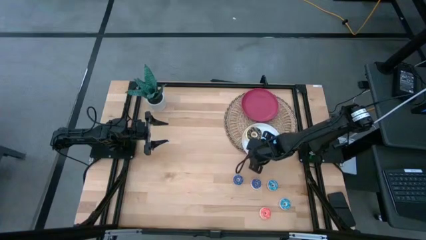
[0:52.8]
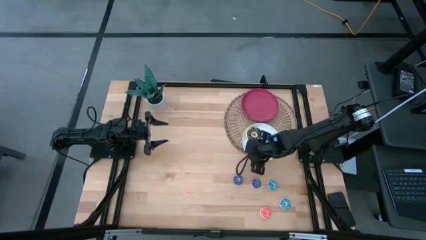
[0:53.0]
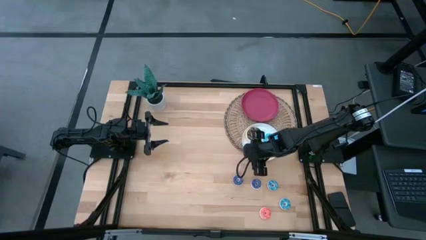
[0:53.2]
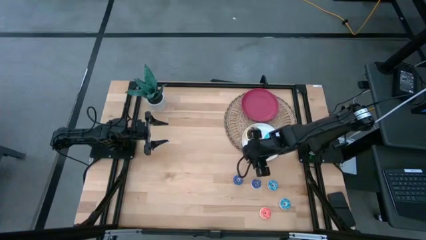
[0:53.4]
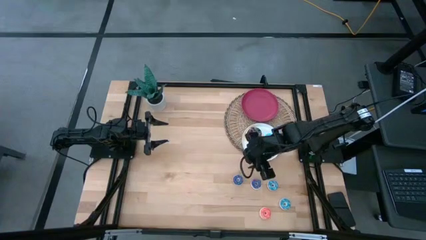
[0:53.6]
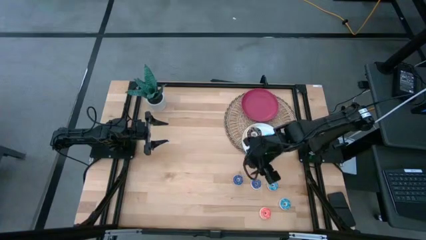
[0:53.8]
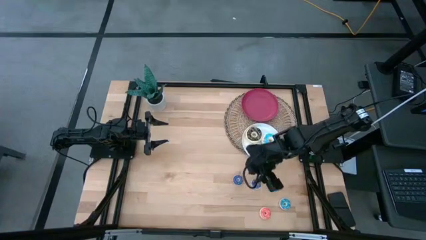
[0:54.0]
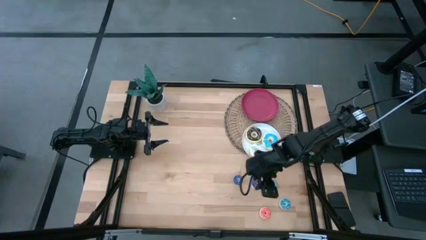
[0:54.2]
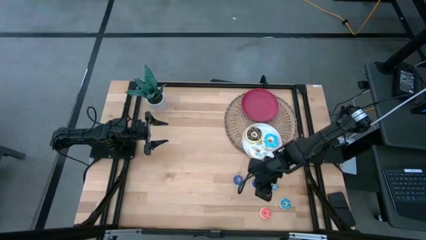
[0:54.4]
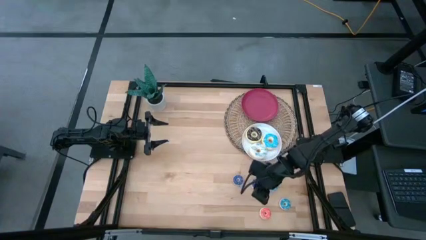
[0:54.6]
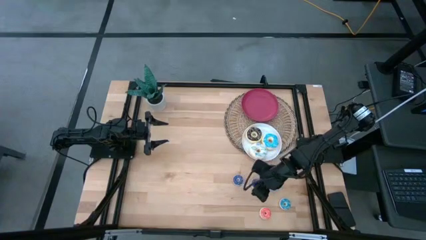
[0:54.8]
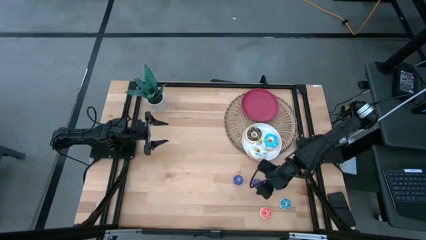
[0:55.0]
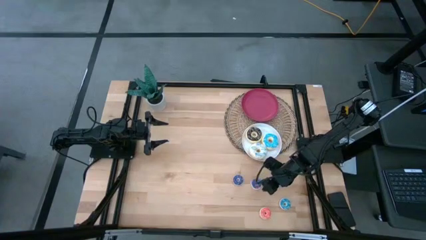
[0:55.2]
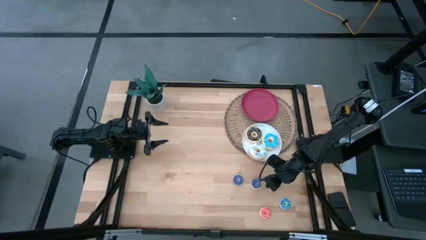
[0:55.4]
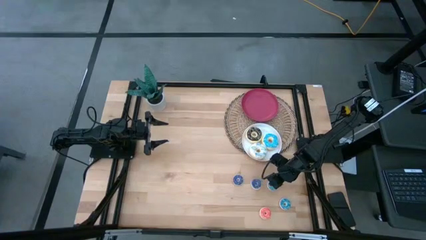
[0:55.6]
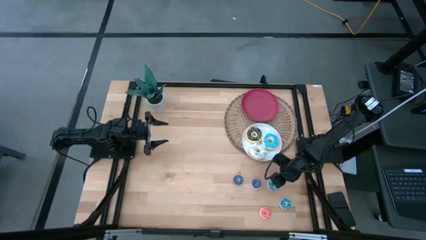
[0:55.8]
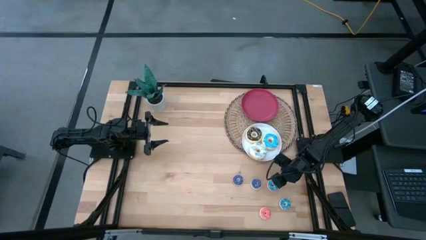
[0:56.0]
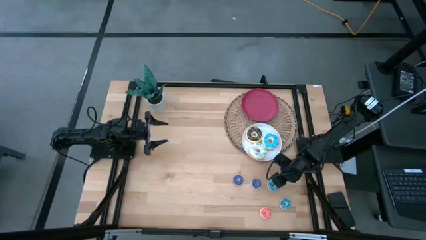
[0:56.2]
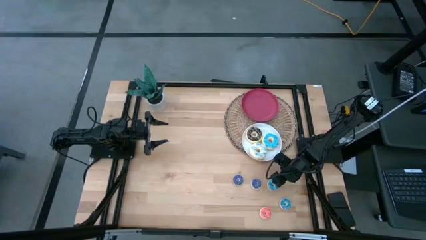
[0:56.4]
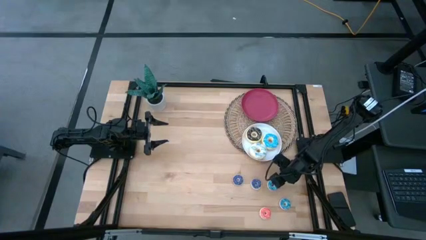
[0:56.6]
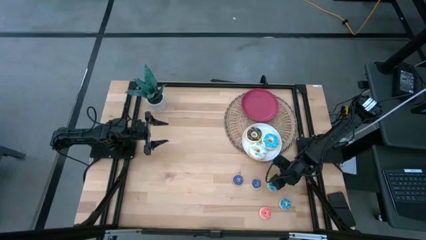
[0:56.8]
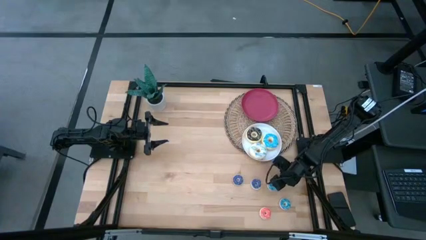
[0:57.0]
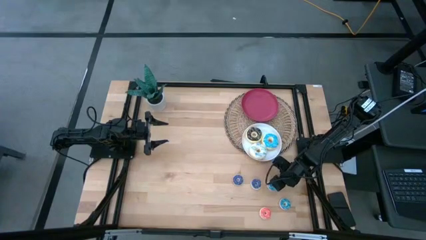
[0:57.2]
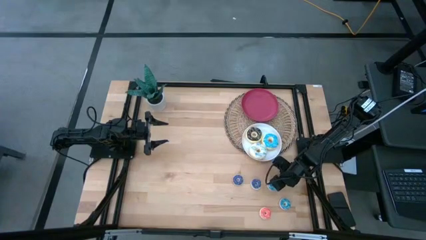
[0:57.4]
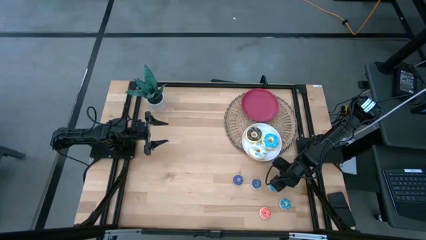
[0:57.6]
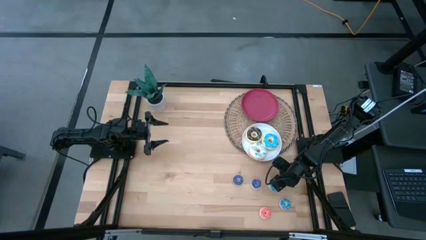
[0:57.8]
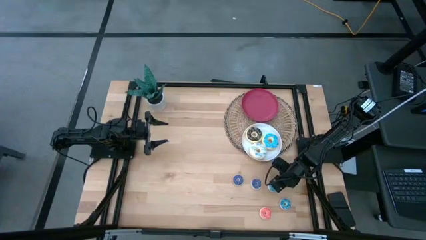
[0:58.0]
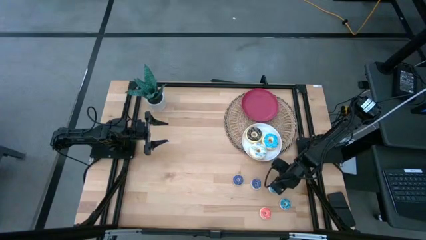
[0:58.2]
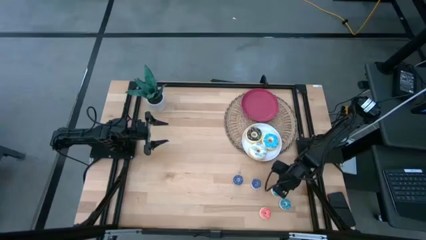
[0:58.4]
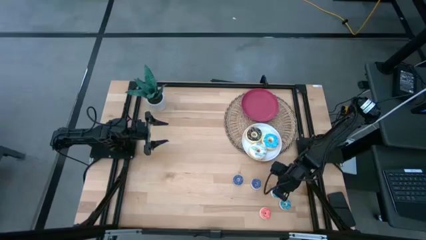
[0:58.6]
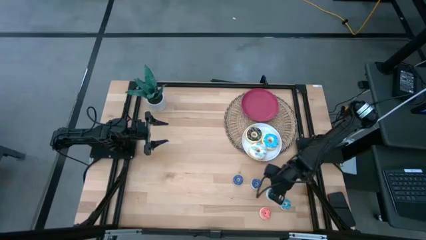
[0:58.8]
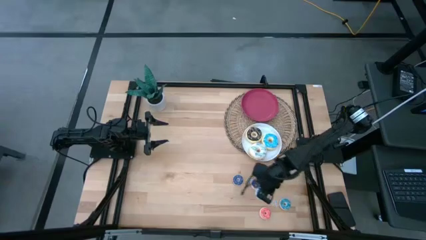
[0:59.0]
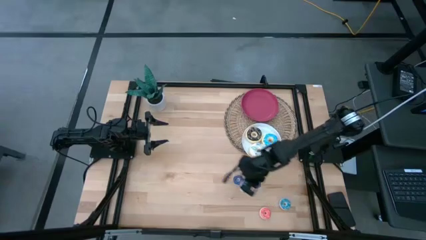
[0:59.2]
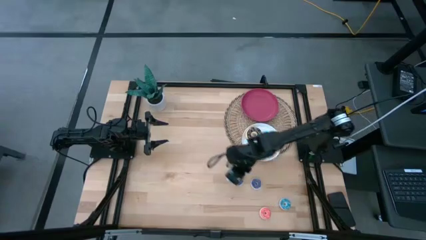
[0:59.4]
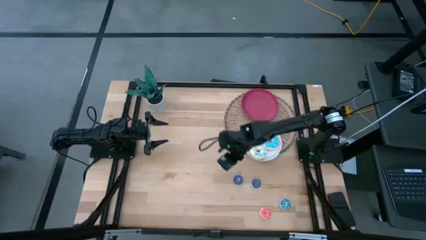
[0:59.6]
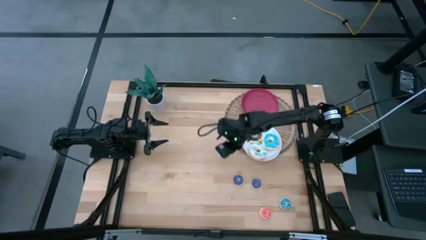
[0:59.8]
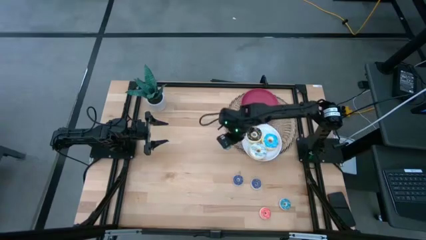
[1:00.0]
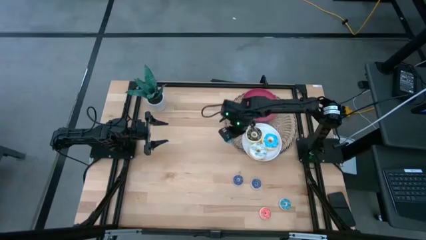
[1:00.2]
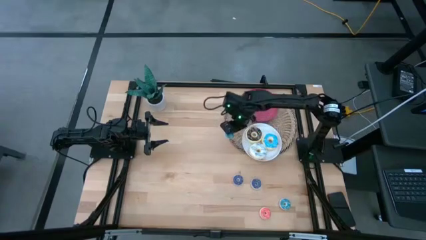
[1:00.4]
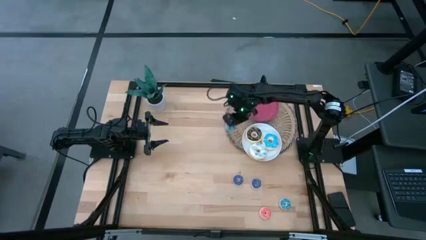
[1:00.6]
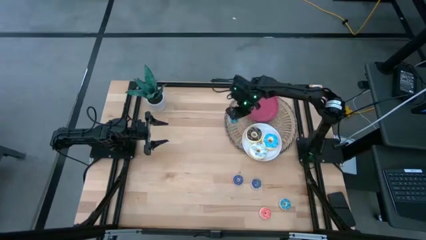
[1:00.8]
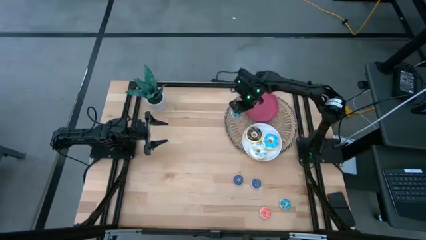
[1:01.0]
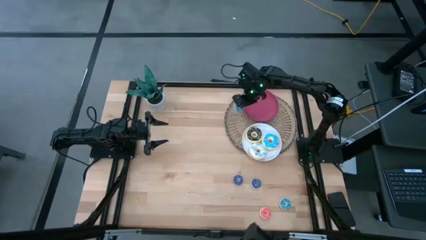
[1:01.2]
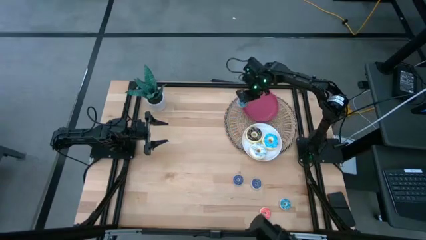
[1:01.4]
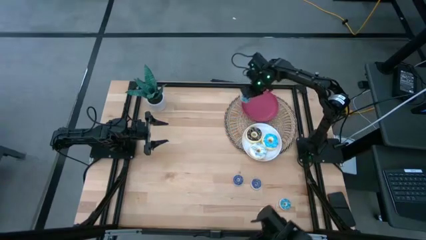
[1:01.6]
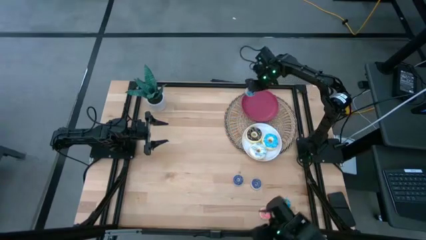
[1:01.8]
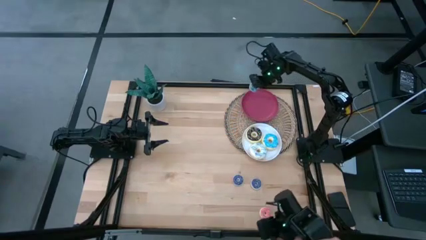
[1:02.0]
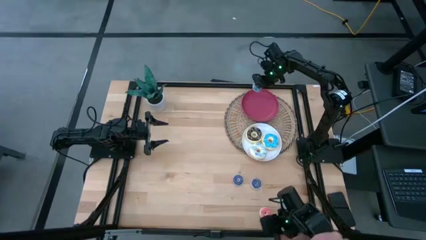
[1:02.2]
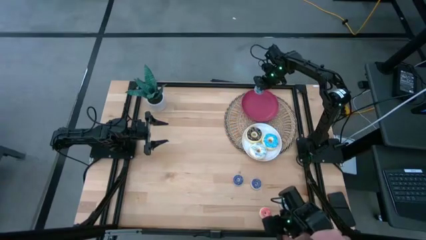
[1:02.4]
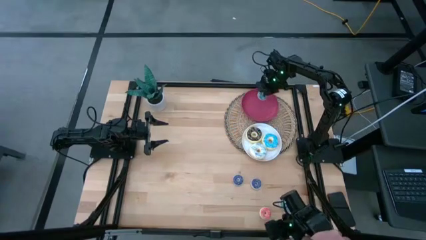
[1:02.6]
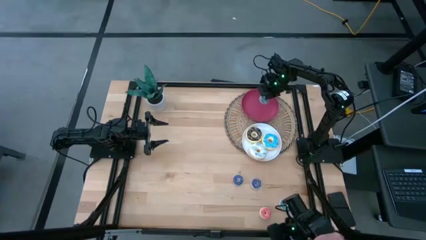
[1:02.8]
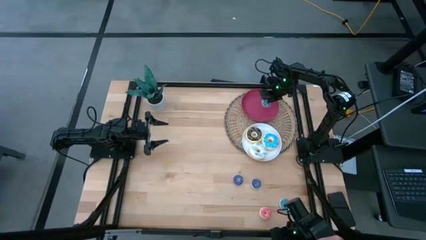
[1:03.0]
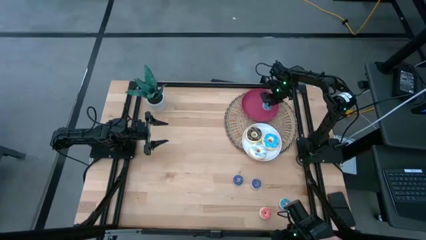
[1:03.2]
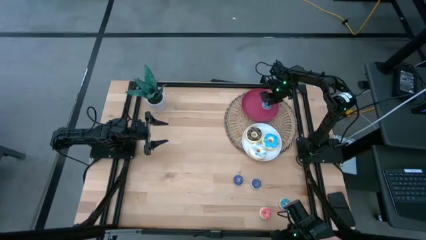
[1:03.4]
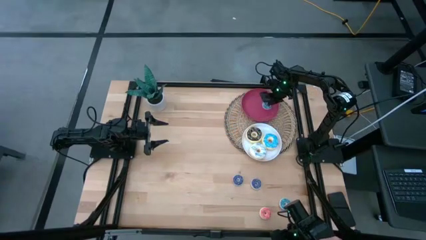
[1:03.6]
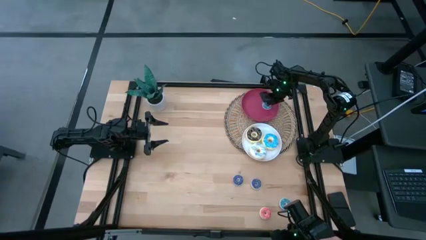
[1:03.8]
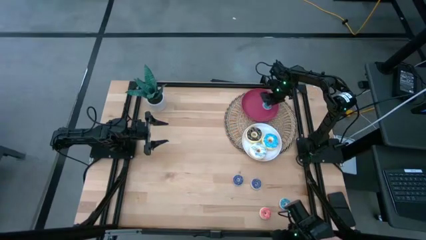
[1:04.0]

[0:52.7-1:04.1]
Task: Pick & Place donuts
Put the top small blue donut on the red plate
